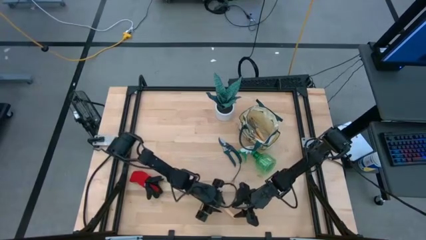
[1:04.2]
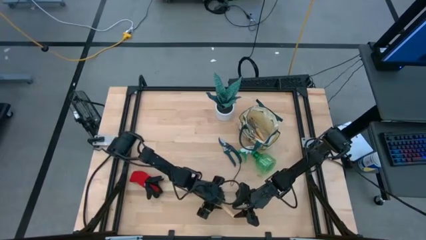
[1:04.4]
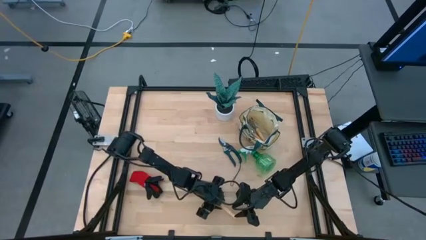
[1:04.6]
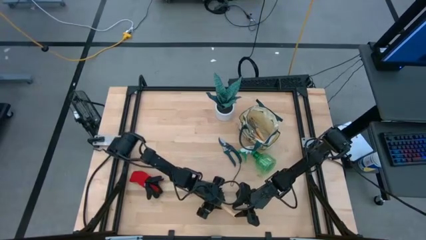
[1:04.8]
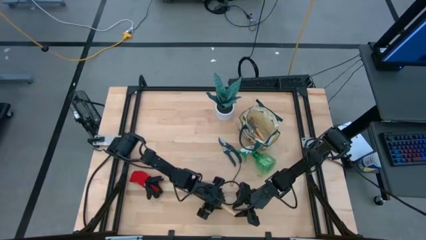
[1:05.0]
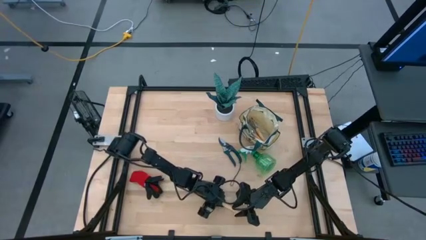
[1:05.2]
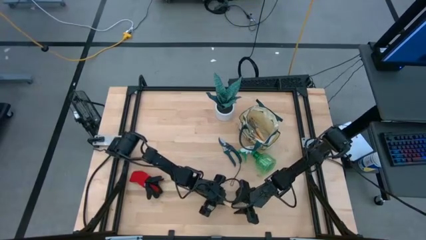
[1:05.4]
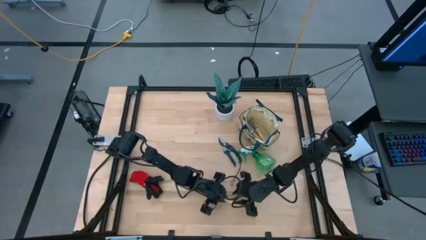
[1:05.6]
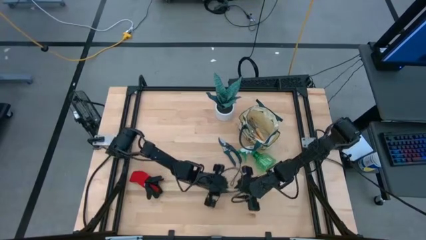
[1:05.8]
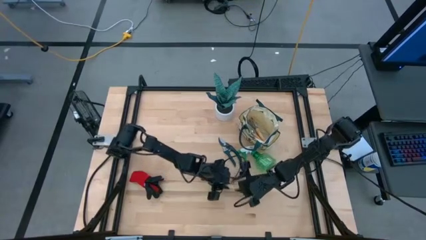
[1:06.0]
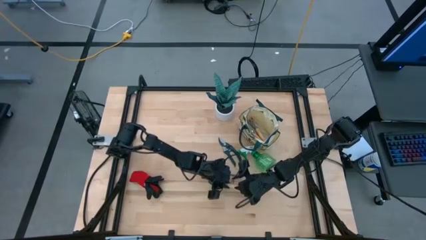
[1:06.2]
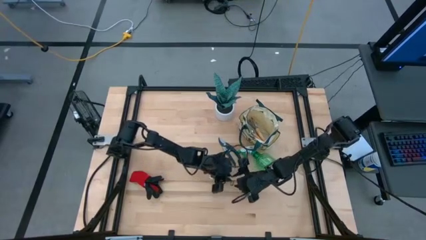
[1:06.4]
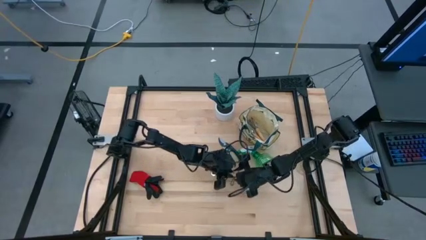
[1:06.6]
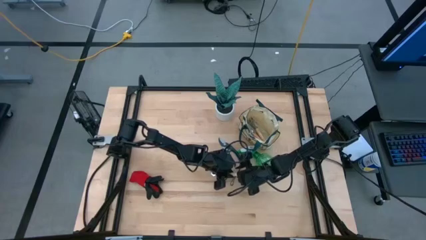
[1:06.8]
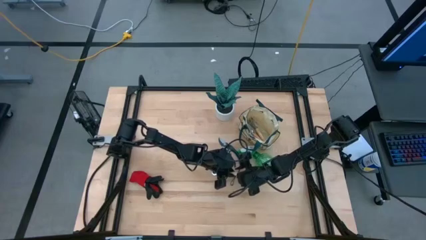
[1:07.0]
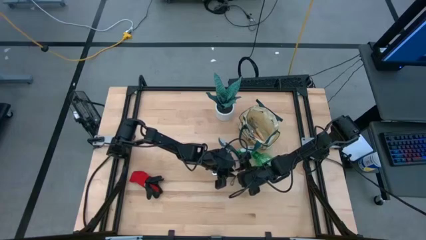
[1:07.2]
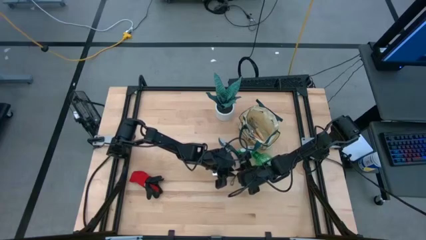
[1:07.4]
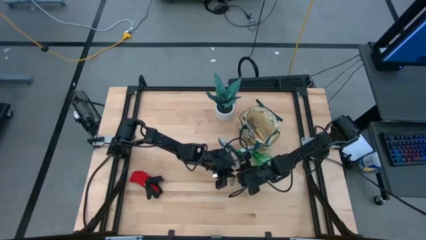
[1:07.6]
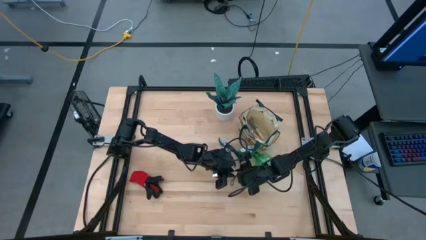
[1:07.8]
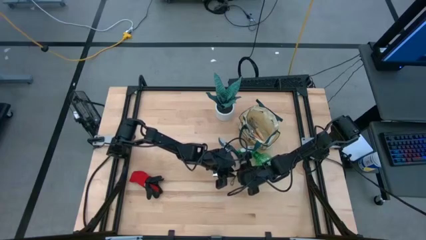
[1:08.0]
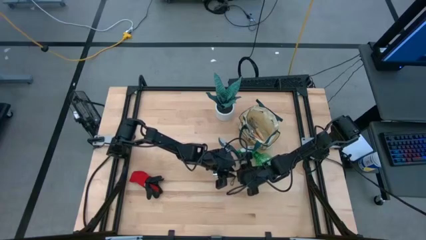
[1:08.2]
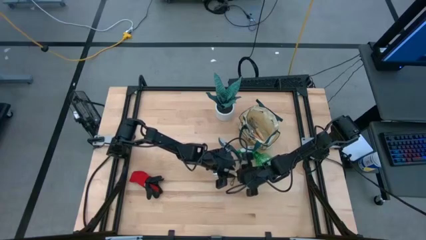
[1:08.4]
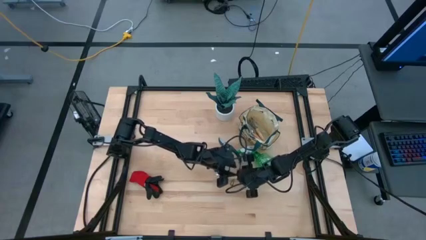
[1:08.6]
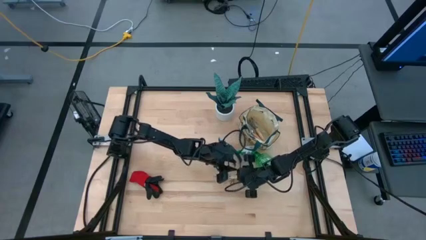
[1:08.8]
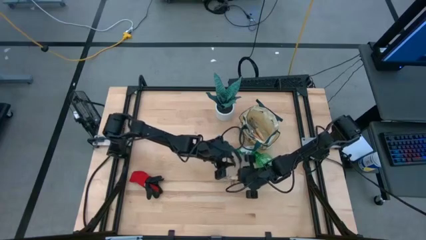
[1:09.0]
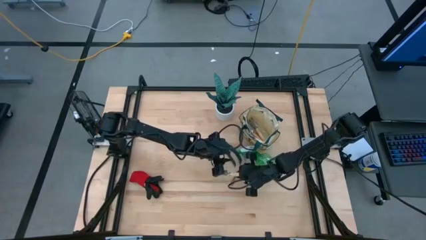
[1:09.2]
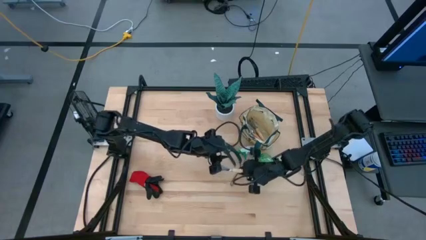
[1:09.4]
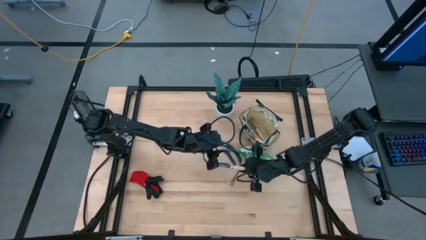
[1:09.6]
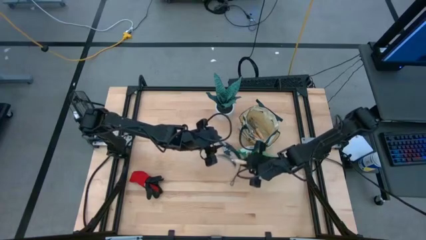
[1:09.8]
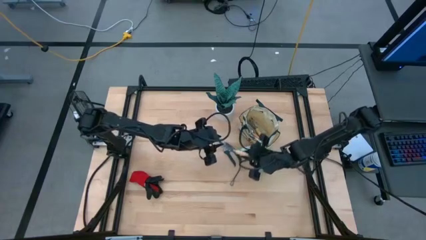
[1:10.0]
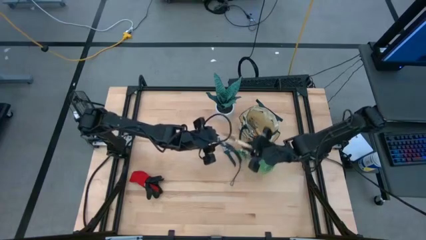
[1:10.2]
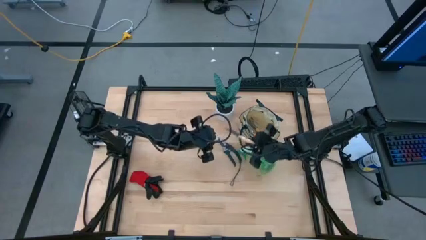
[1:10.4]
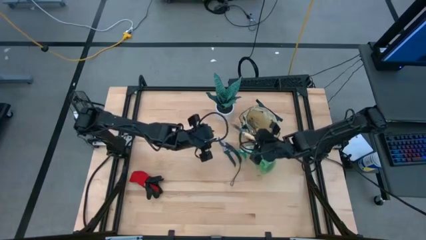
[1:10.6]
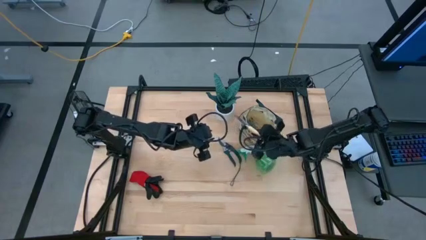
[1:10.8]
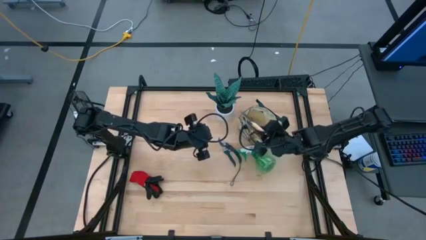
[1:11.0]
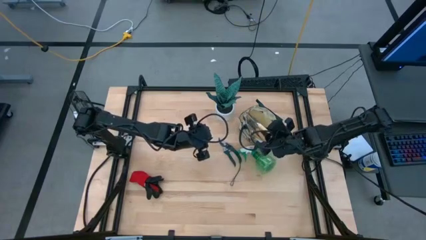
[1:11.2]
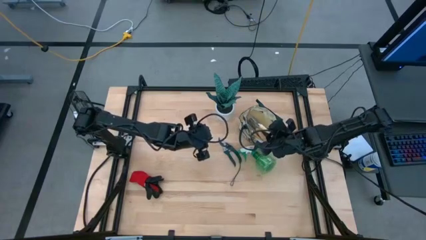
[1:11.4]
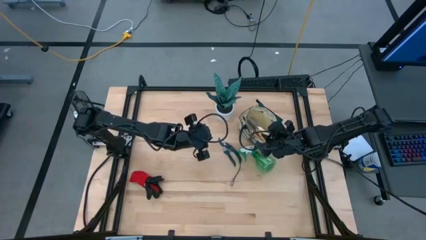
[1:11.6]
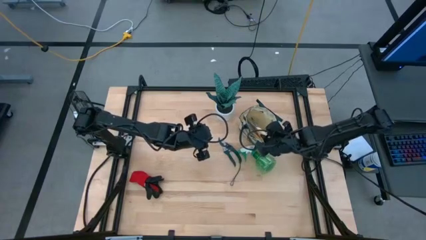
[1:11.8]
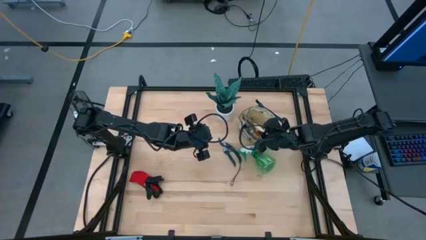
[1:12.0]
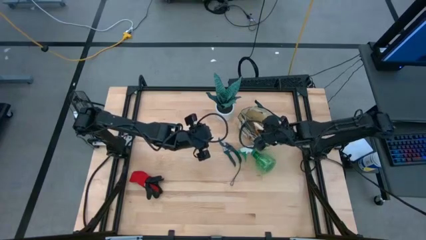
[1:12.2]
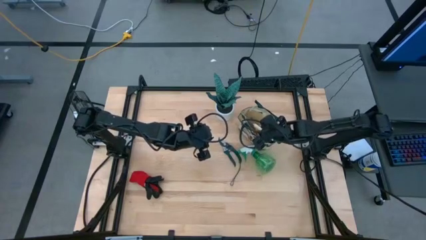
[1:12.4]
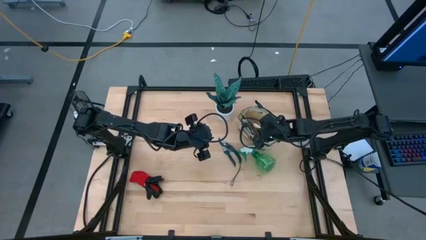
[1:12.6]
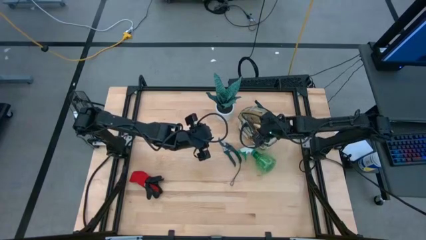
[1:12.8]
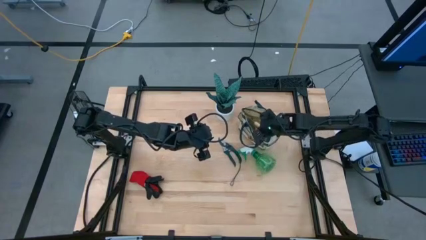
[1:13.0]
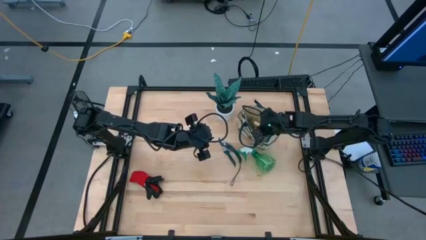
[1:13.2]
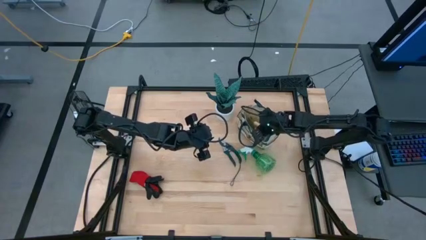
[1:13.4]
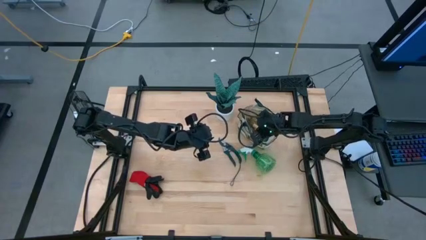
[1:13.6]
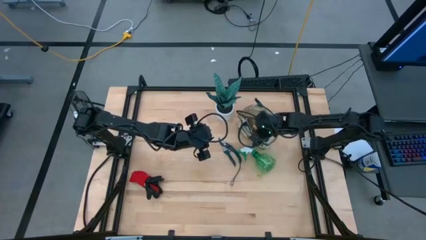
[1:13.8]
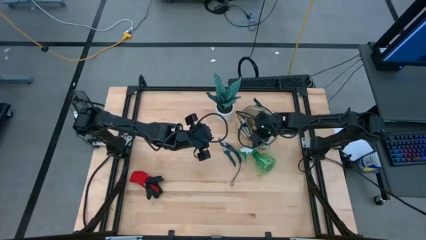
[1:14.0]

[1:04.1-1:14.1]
Task: Pick & Place Garden tools in Gardening bag
Put the brown trowel into the gardening bag
